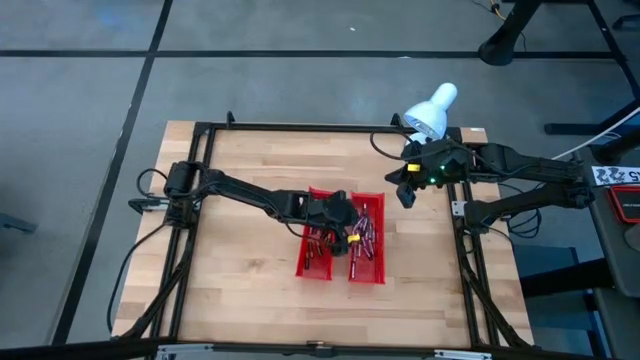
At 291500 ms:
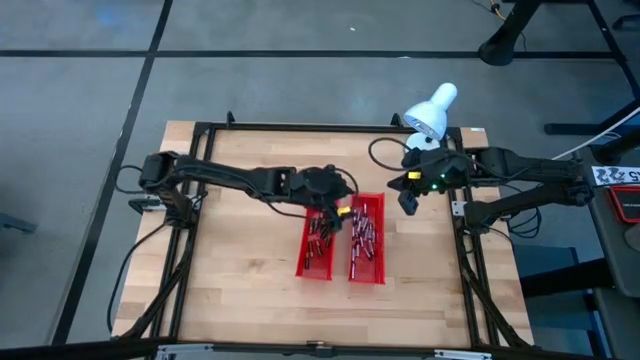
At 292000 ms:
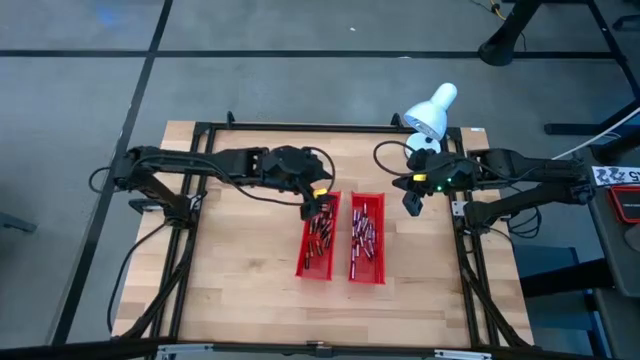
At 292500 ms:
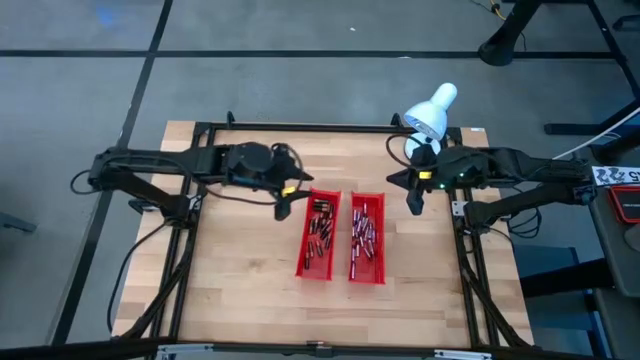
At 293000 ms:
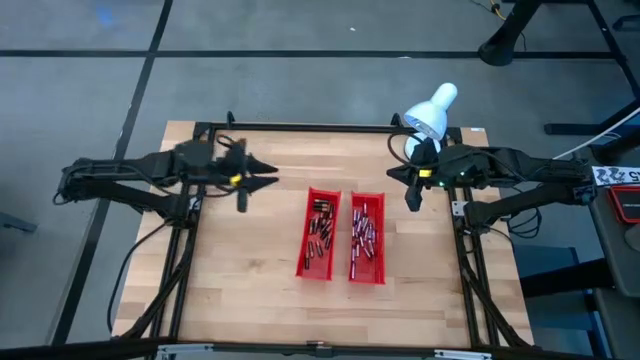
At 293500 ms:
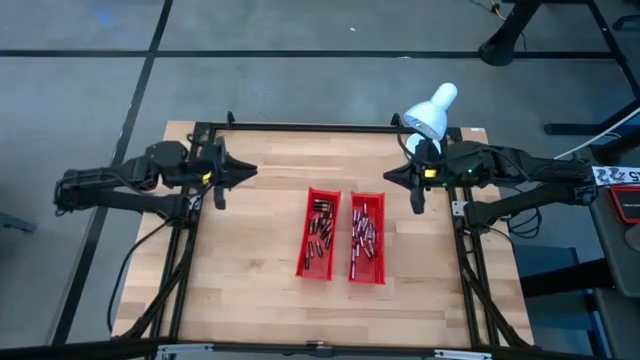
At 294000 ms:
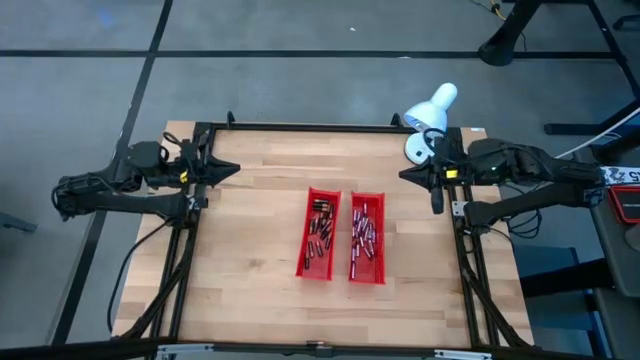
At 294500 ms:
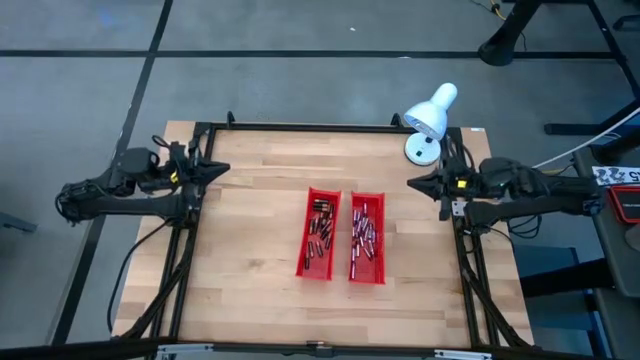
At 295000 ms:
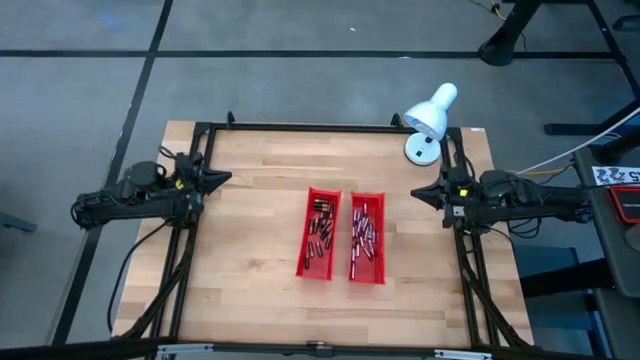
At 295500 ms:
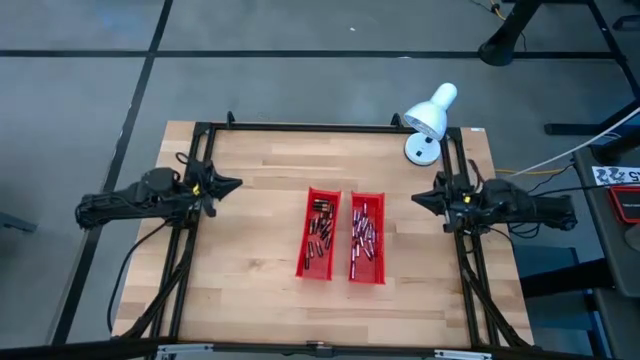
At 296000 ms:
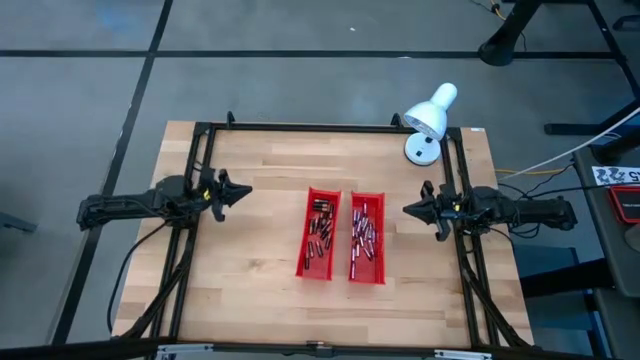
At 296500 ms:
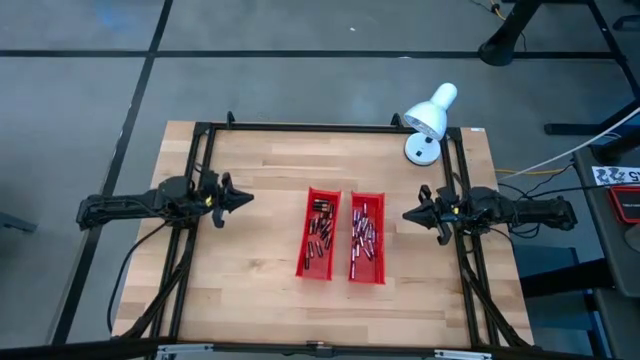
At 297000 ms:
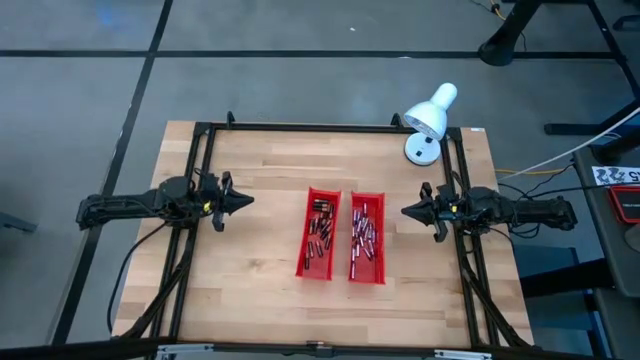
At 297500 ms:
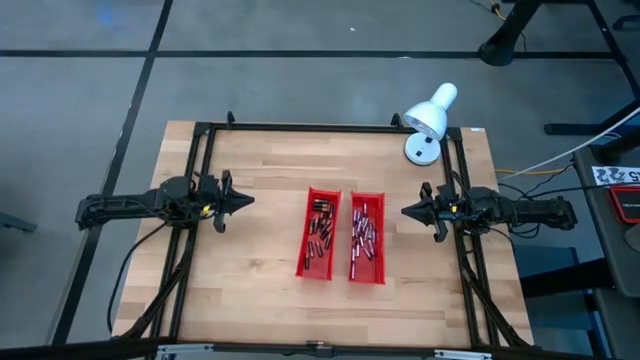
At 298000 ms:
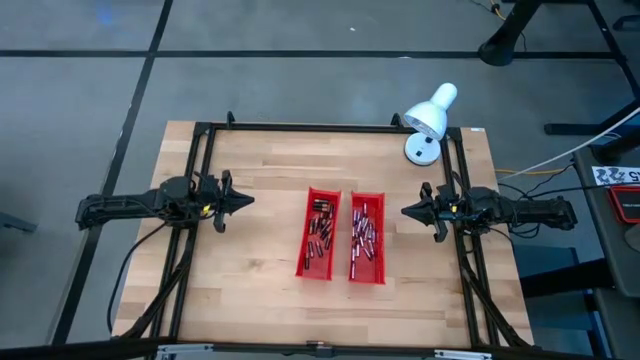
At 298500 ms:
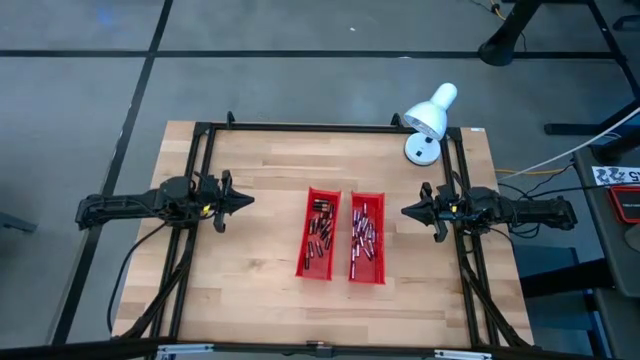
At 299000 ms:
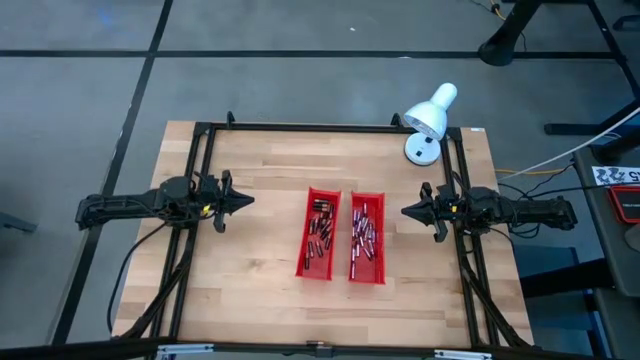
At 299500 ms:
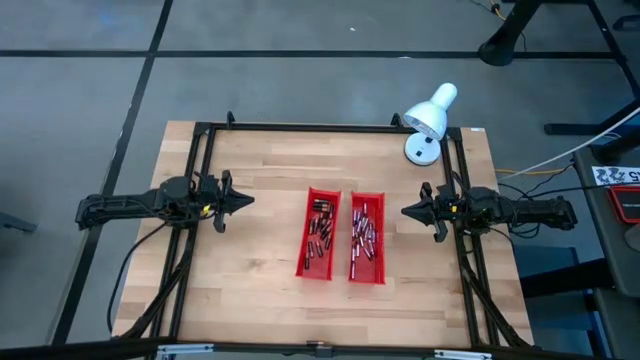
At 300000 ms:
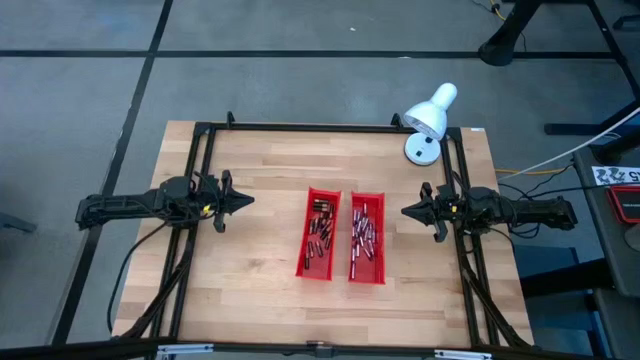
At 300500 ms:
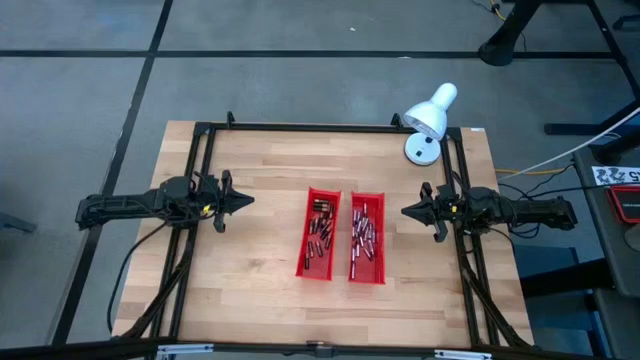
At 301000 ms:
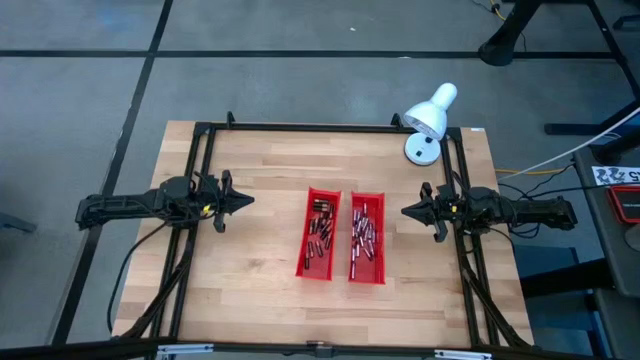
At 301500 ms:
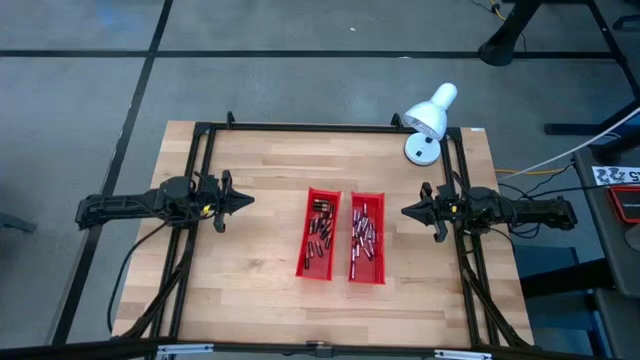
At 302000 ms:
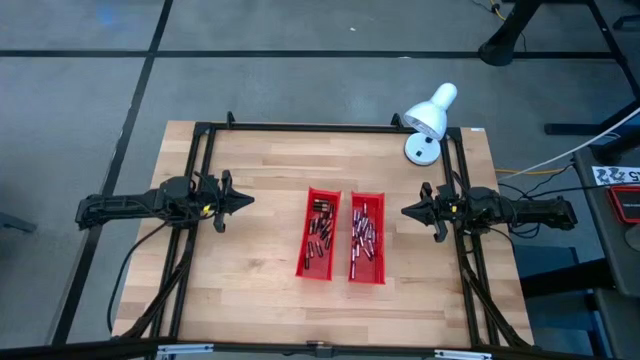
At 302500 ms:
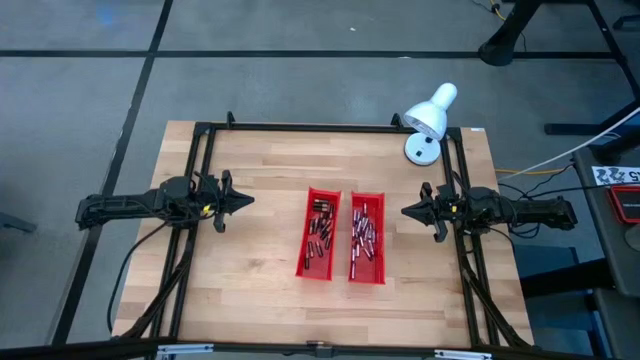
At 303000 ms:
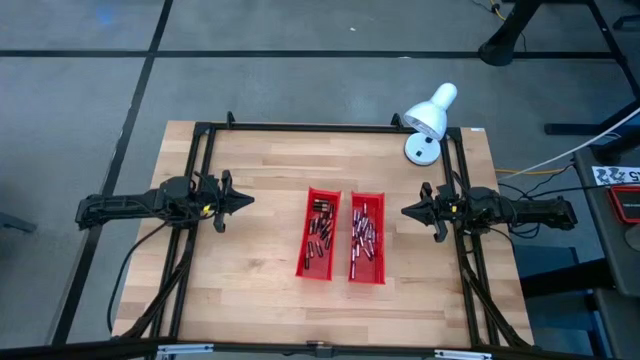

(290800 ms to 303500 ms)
Task: Sort batteries
Return to Home Position

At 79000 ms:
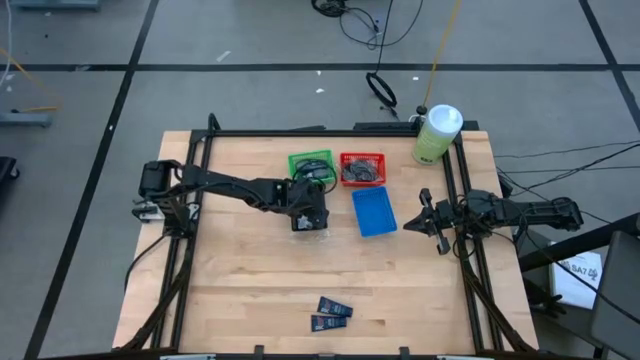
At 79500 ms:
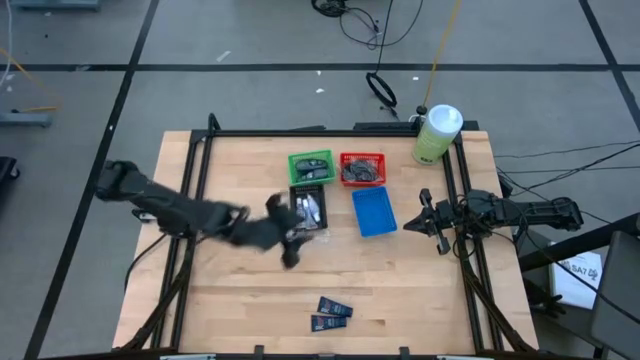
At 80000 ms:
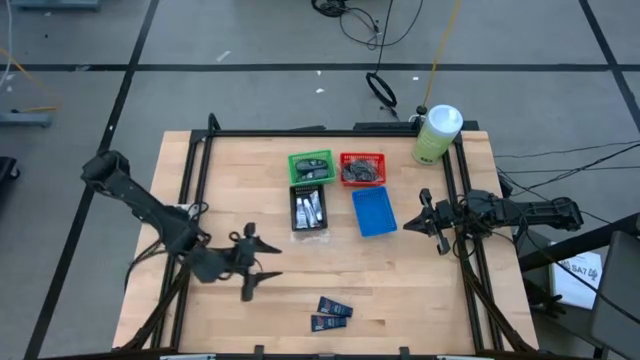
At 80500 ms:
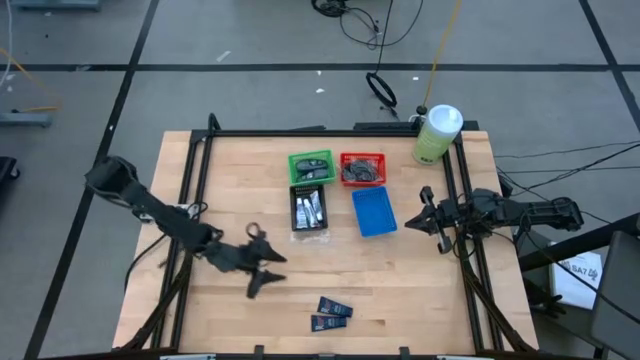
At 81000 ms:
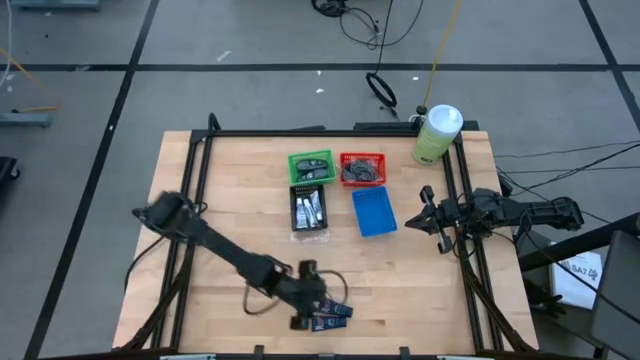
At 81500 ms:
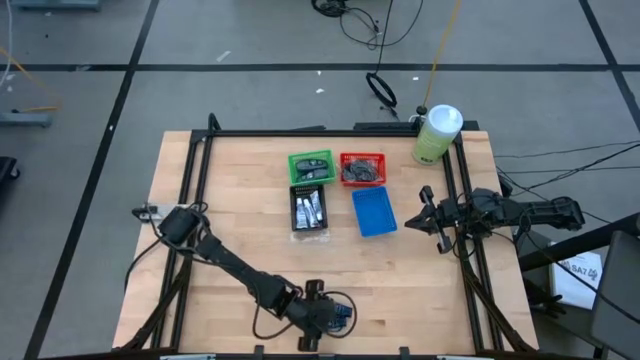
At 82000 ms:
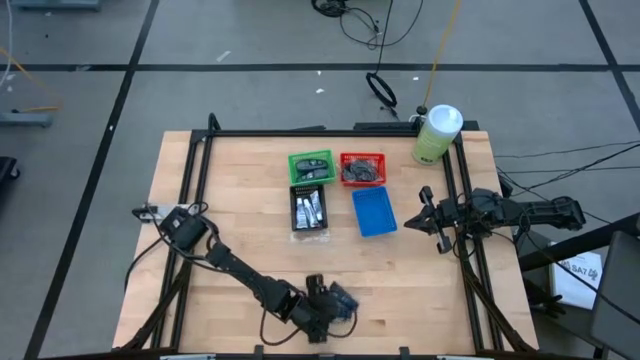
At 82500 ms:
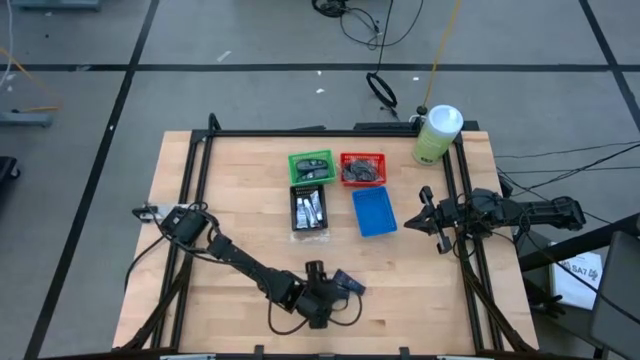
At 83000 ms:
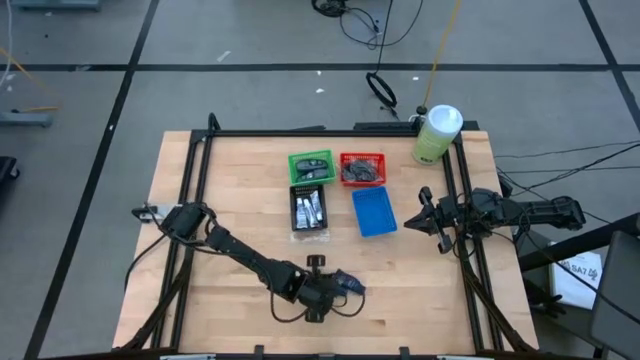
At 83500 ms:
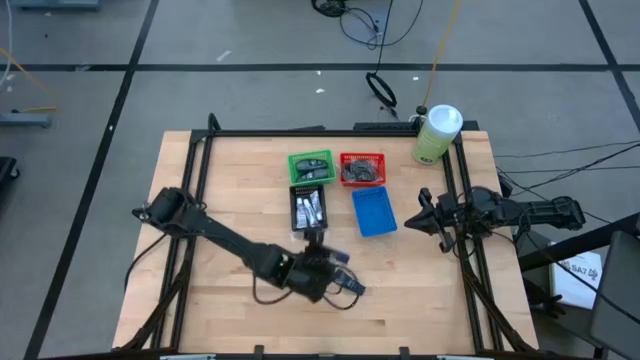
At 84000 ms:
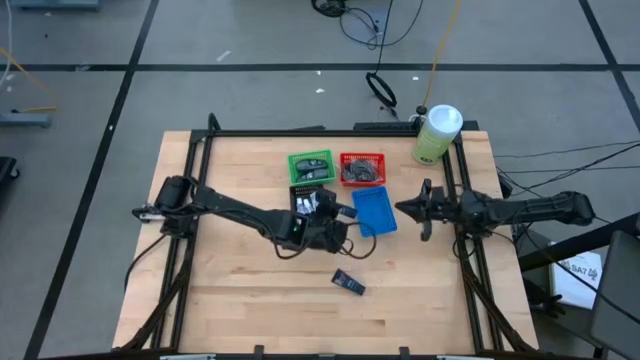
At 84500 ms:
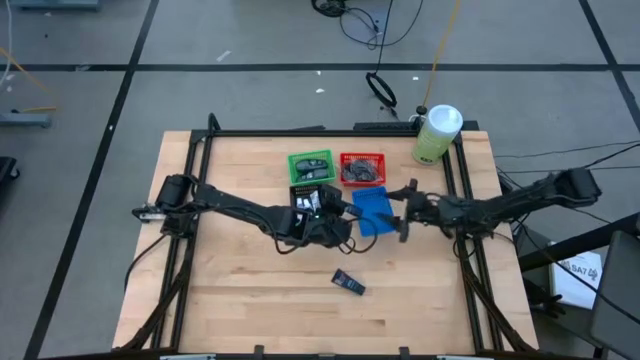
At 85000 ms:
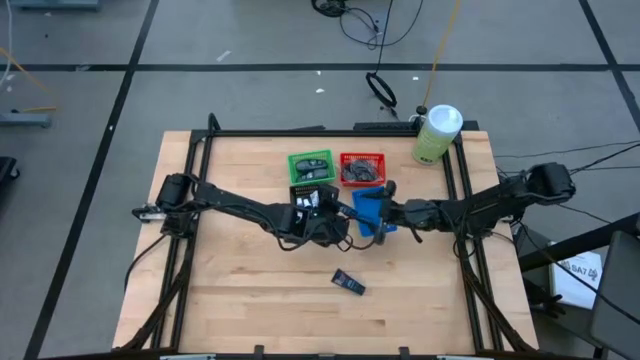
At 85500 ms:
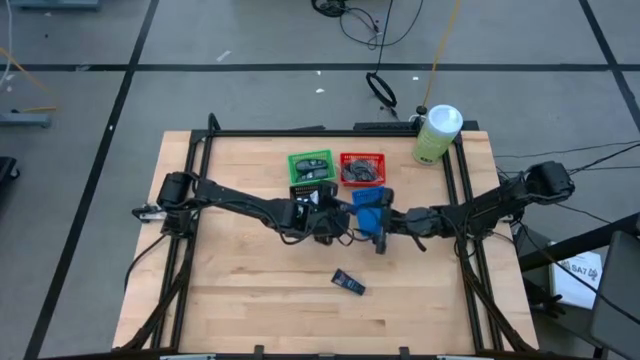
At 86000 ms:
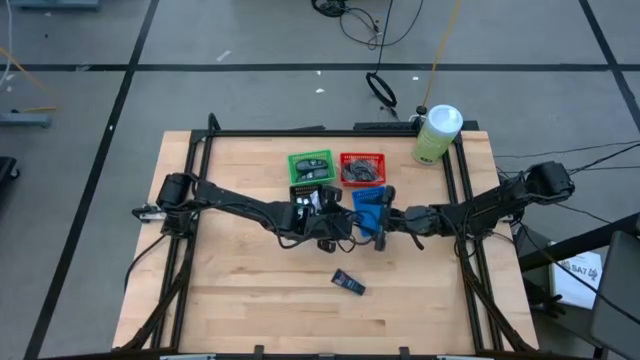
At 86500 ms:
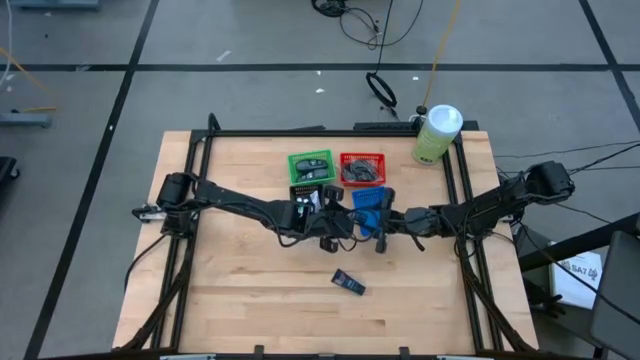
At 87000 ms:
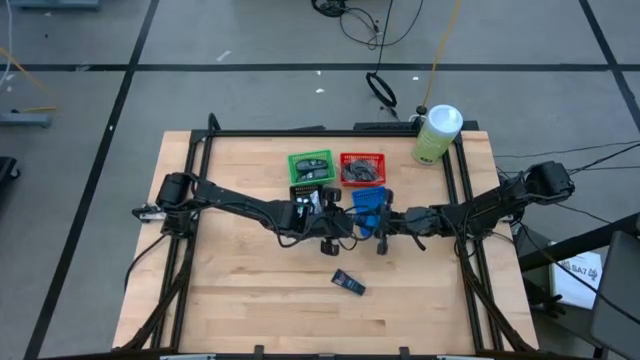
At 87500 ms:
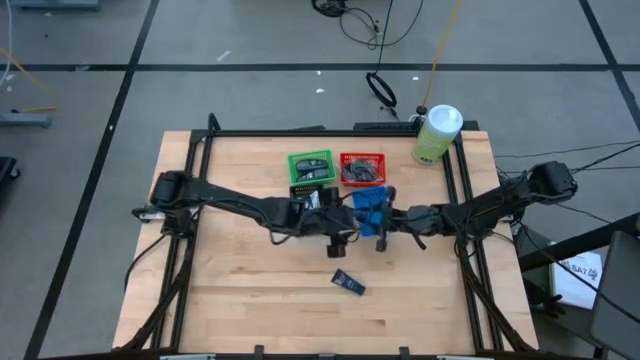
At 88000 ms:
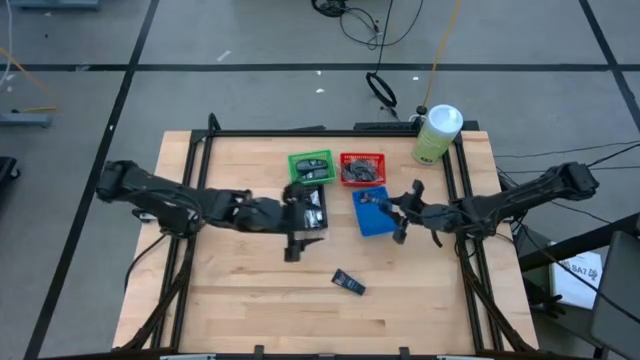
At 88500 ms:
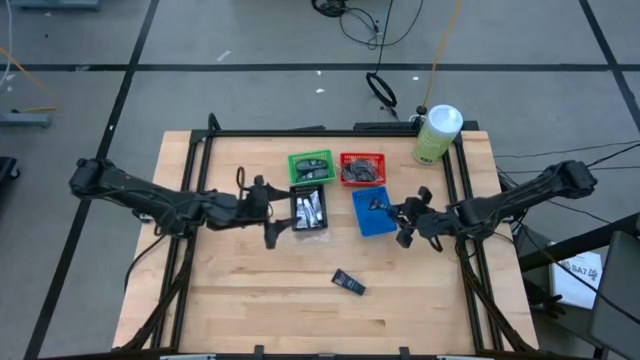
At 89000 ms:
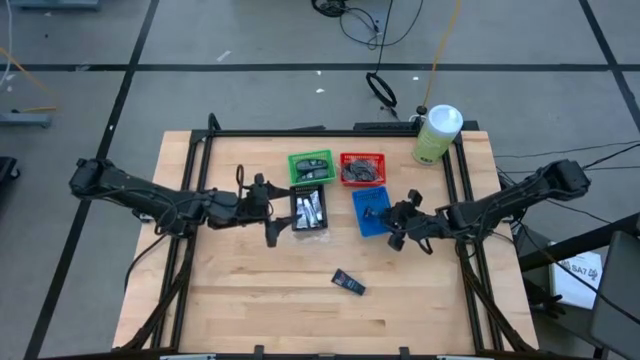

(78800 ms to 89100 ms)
Task: Pick & Place Travel size toiletries
Put the bottom blue shave cream into the blue bin
